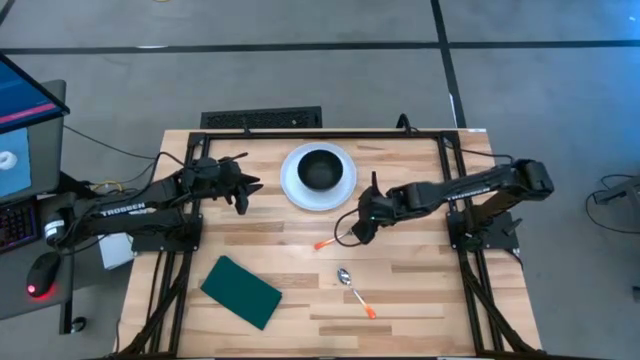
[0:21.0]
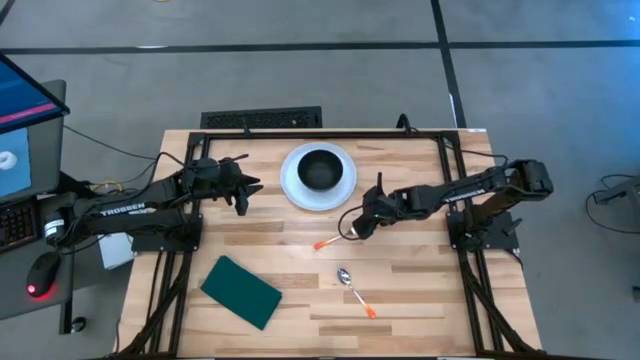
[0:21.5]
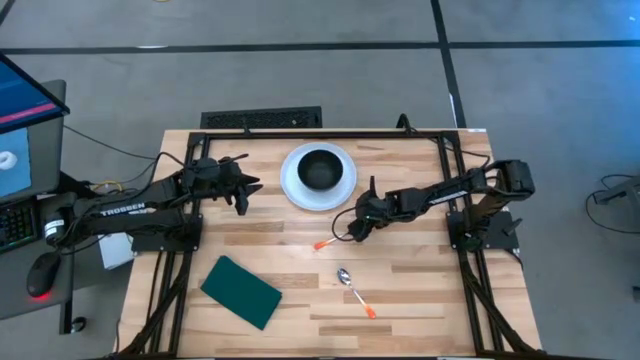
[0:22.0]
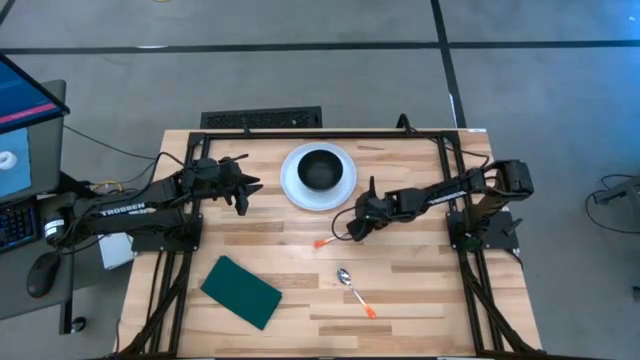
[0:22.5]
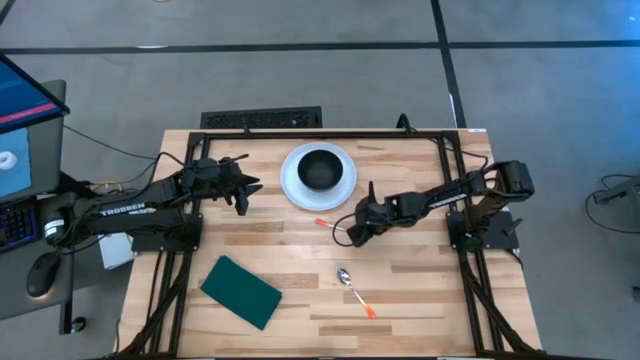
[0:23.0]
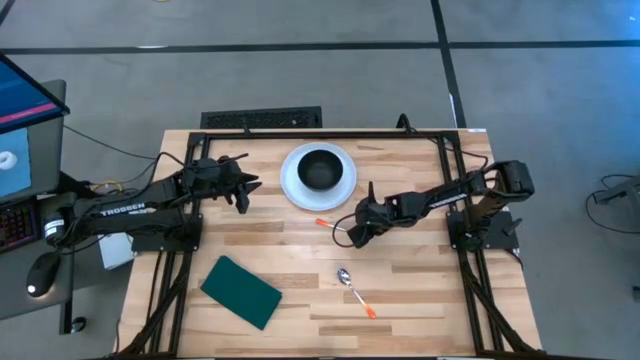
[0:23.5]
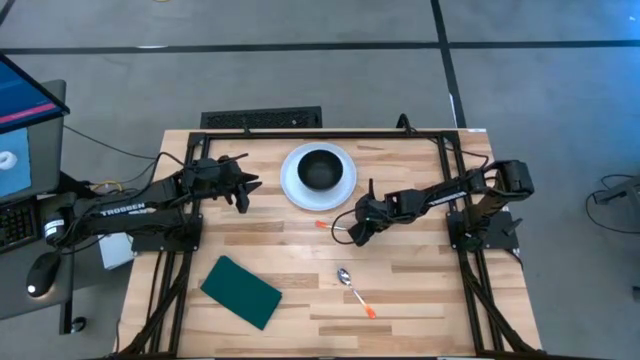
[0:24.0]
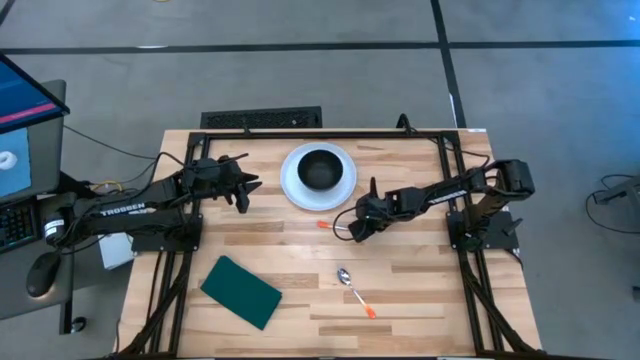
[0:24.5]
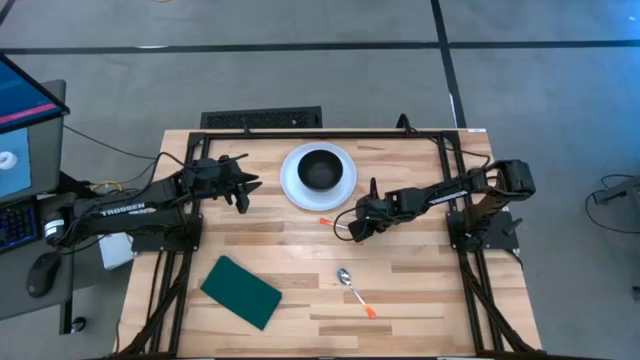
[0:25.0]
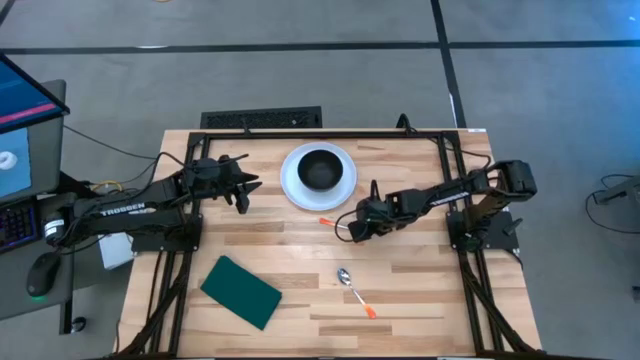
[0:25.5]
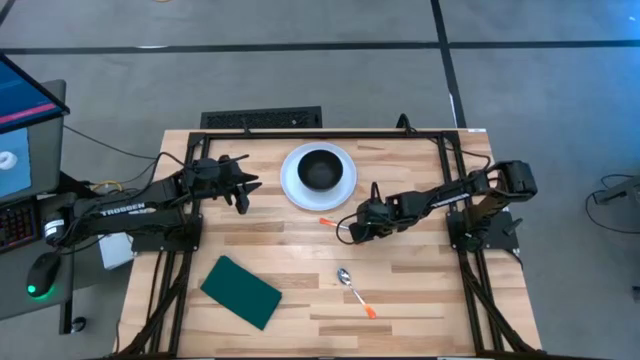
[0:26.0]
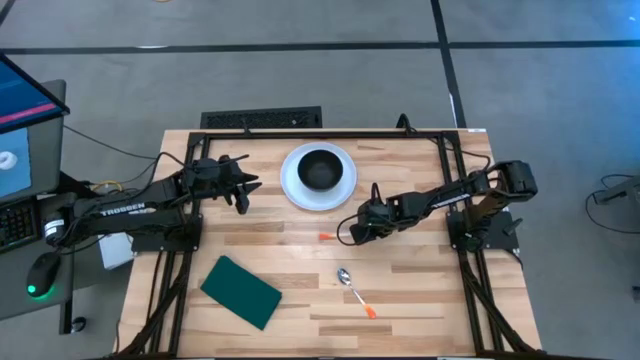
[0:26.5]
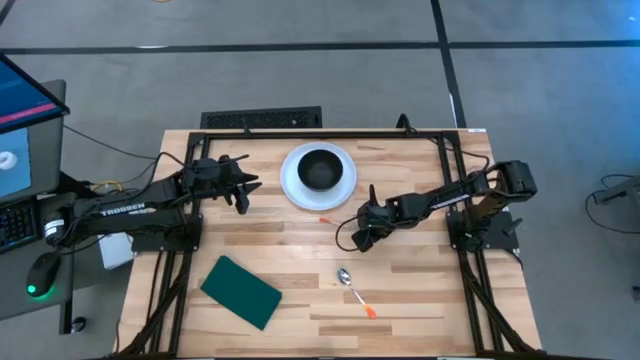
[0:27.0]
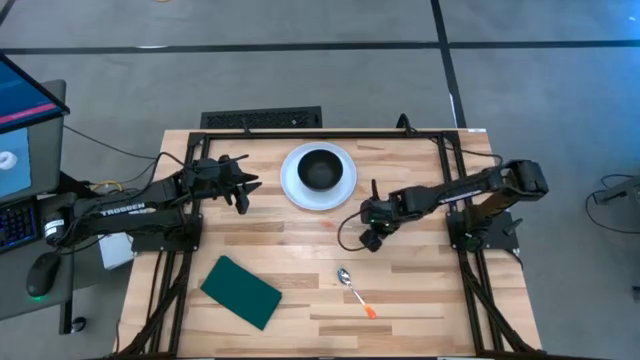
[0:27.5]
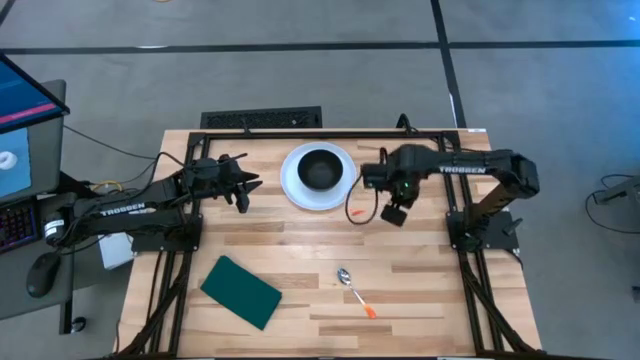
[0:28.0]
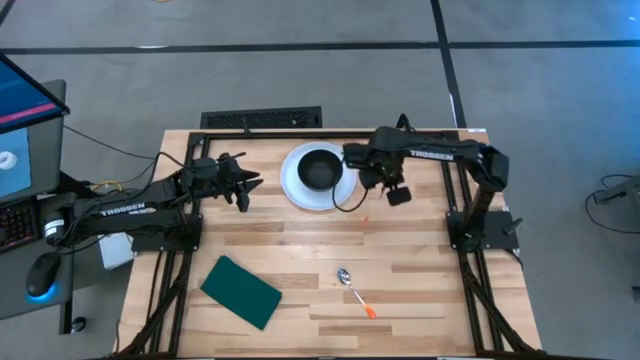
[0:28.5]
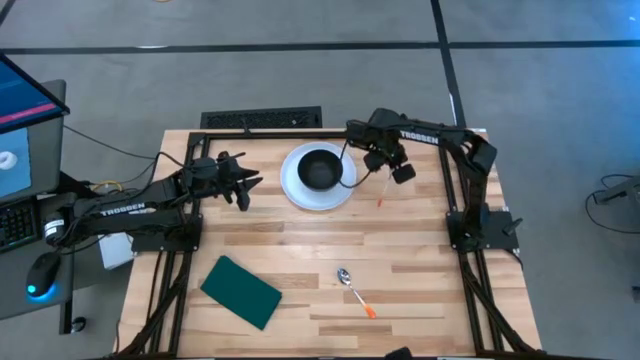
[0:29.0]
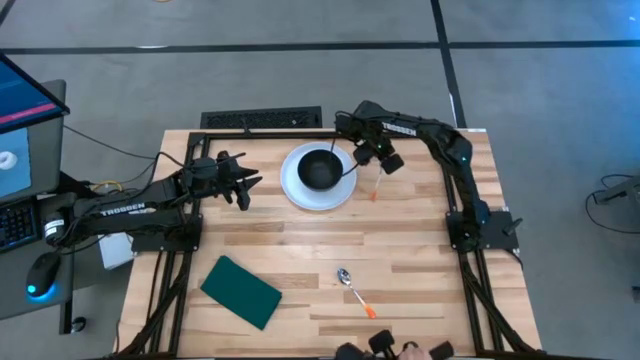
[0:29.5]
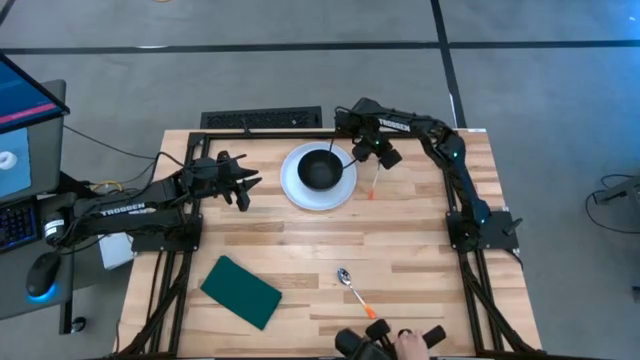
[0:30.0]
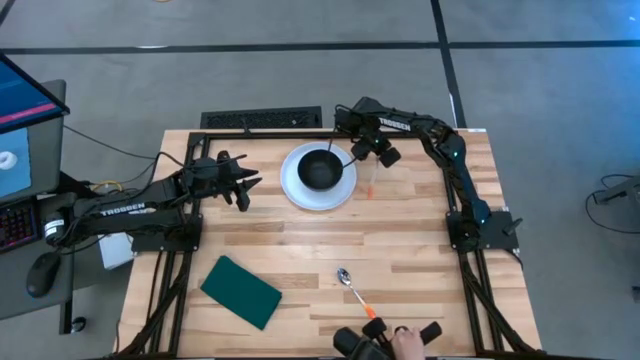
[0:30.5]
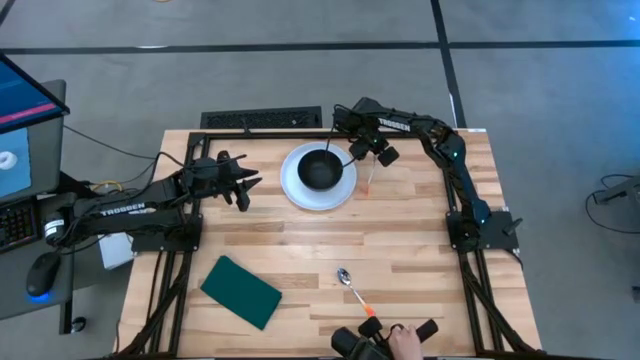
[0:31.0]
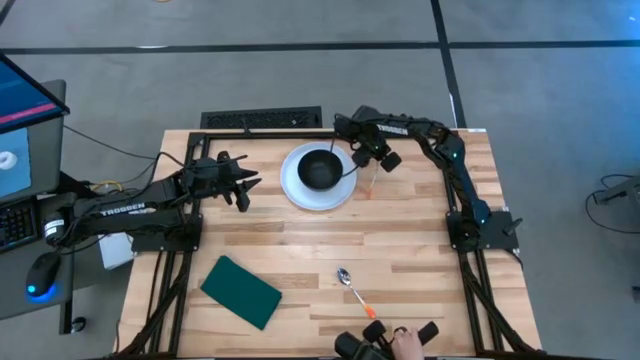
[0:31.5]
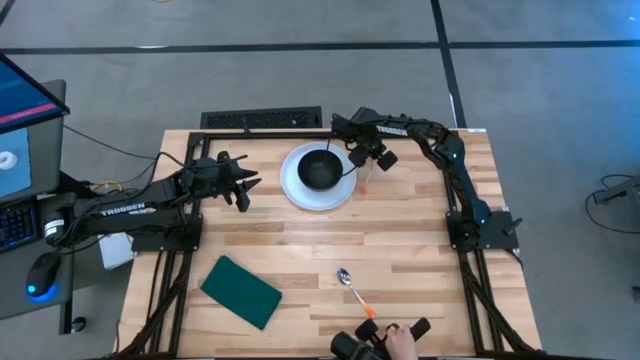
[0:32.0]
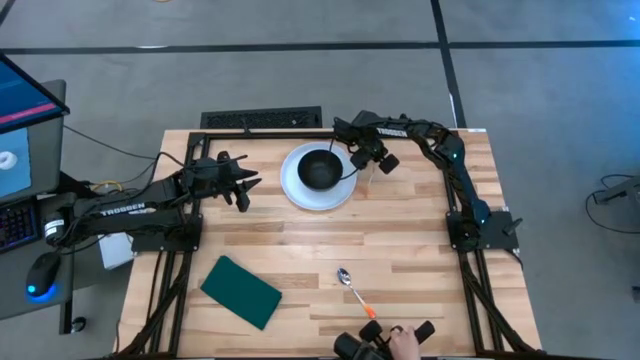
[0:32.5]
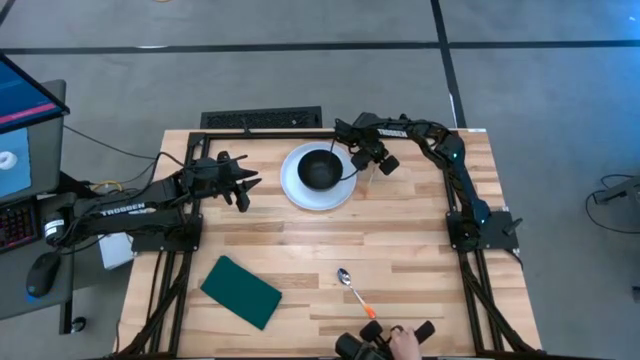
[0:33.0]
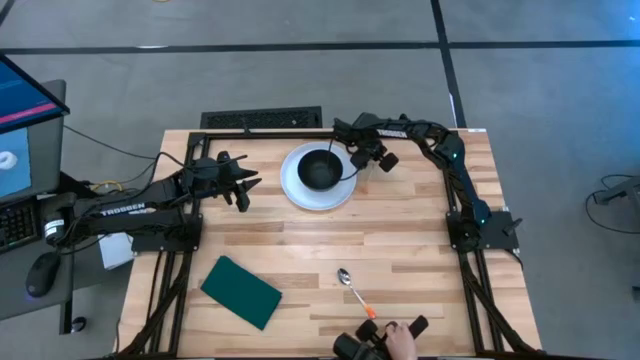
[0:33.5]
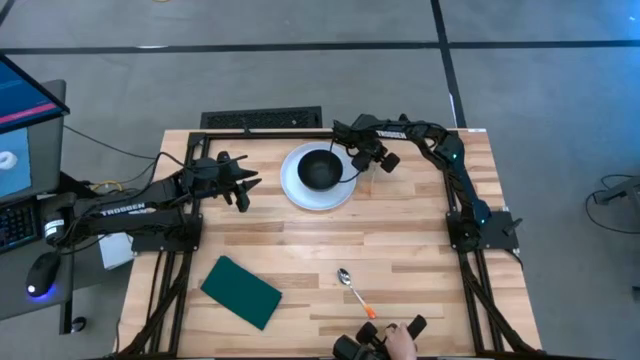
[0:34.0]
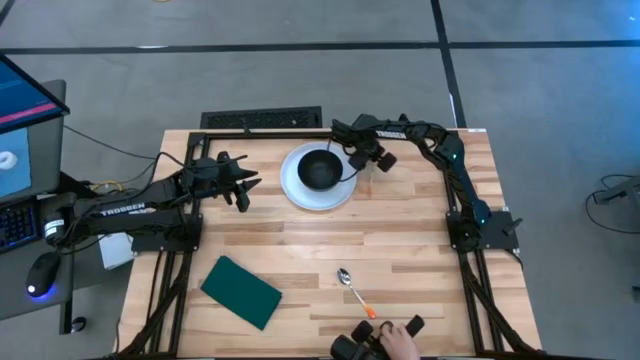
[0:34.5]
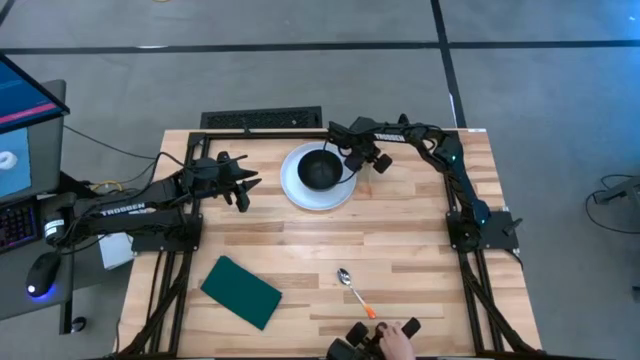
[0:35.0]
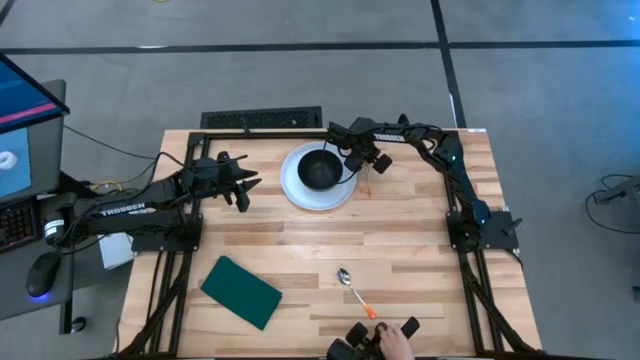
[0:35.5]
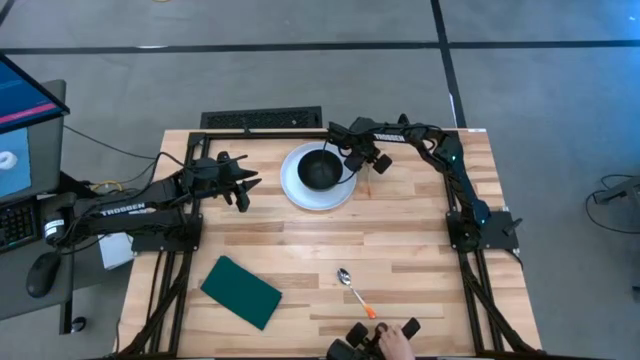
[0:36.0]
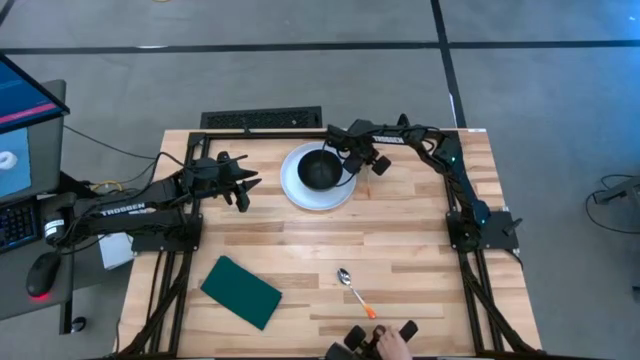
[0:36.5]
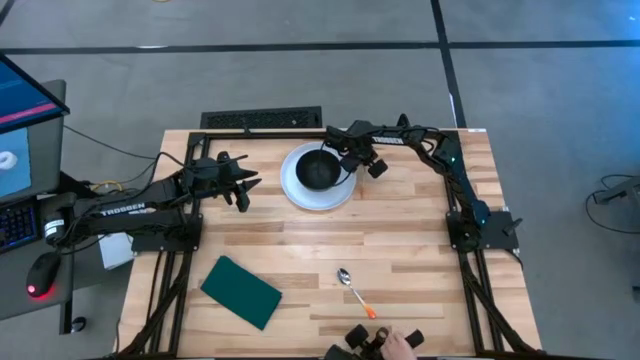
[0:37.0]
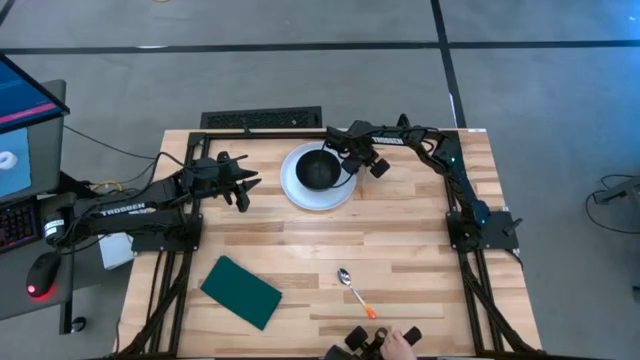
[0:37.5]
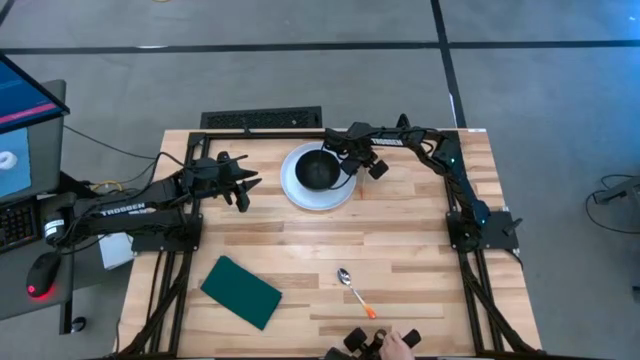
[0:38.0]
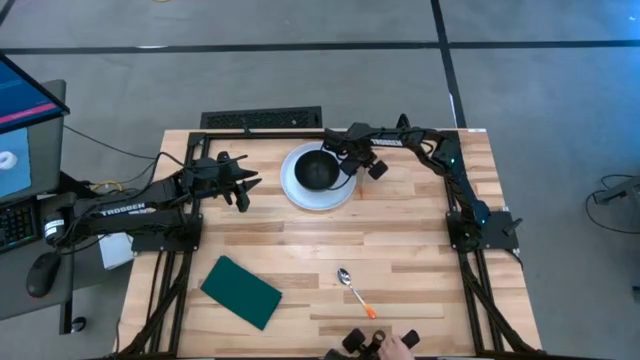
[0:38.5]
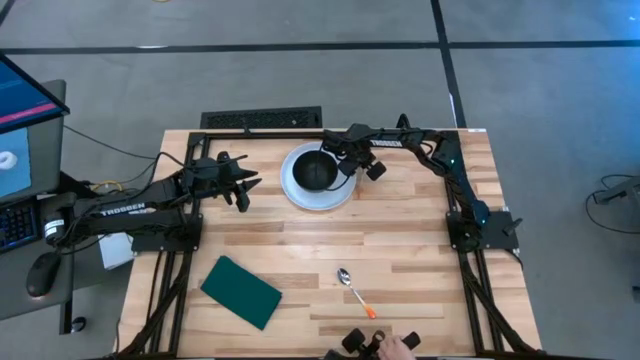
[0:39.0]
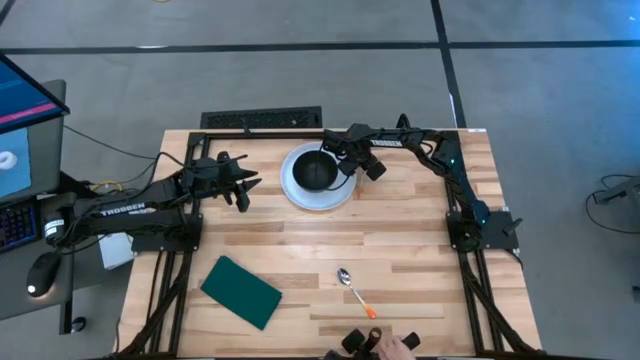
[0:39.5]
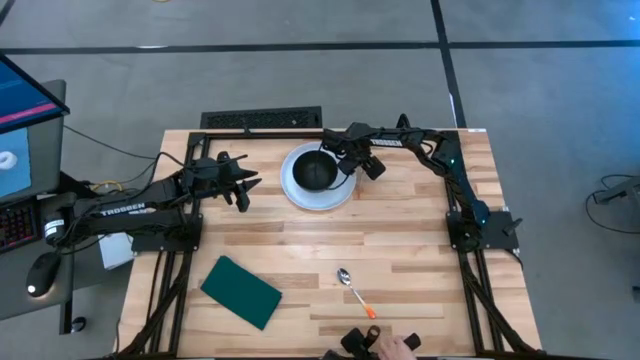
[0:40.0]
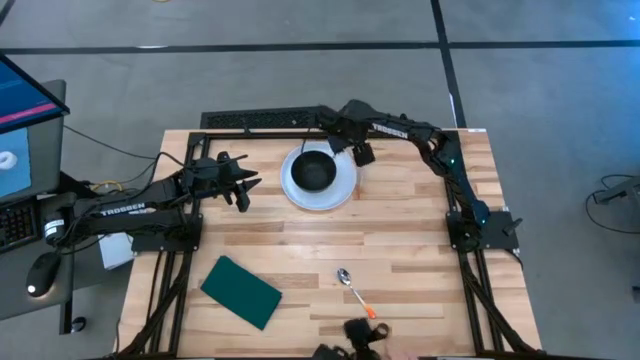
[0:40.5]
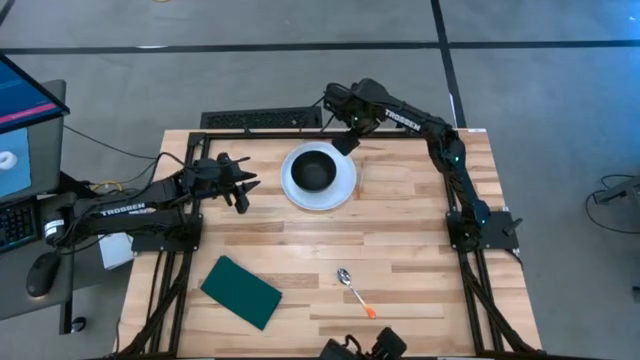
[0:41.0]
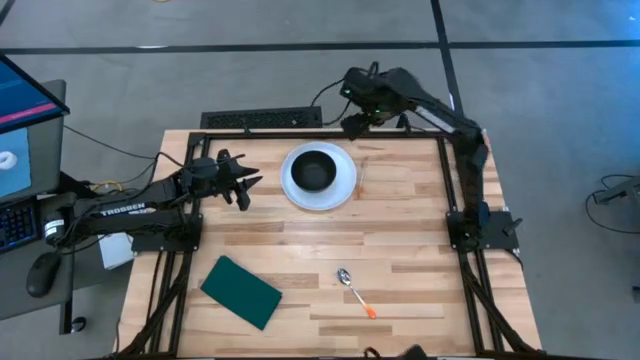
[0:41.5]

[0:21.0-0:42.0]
Task: Set table place
Place the 1st spoon with the orange handle into the black bowl

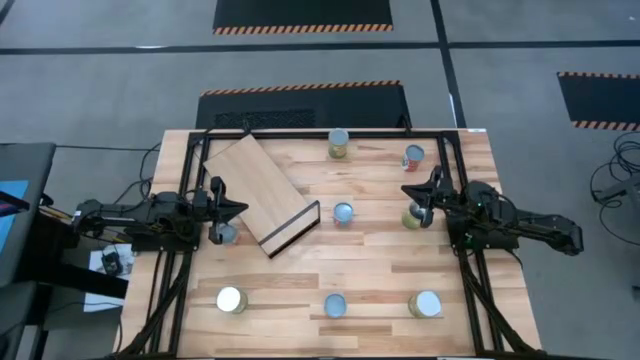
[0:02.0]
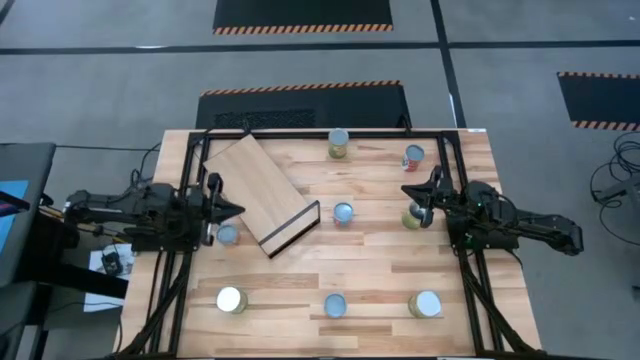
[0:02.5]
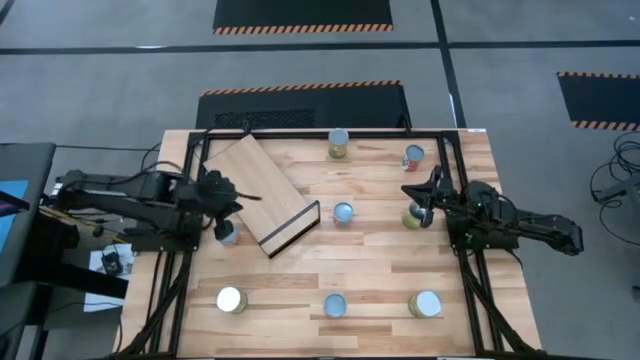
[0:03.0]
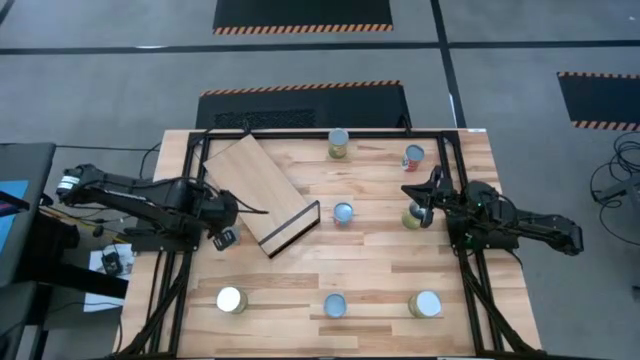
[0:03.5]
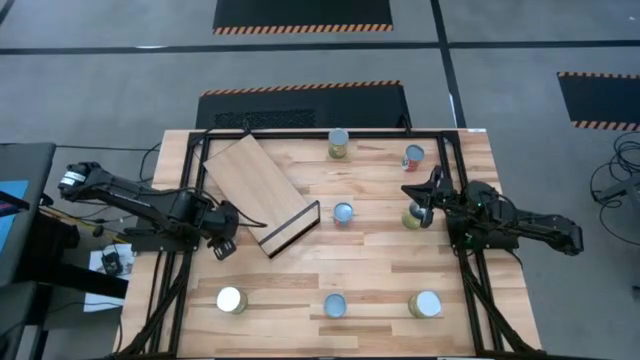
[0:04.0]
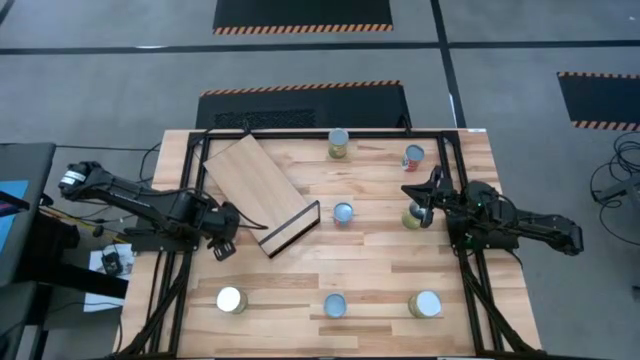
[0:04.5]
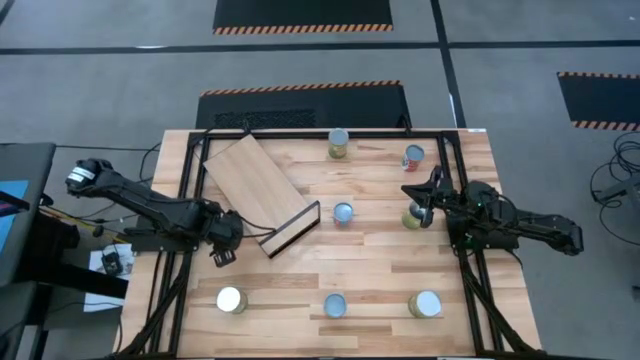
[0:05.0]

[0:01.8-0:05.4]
Task: Pick and place cans onto a shelf
Put the small canned oranges on the shelf
